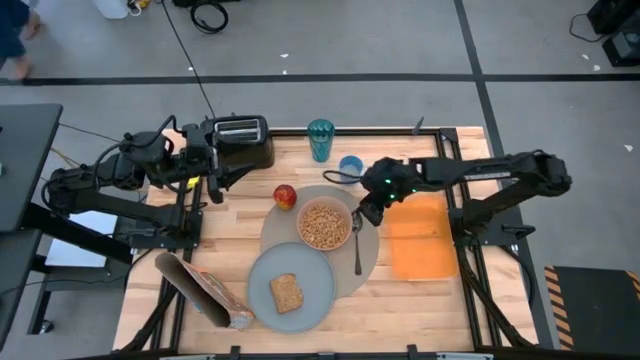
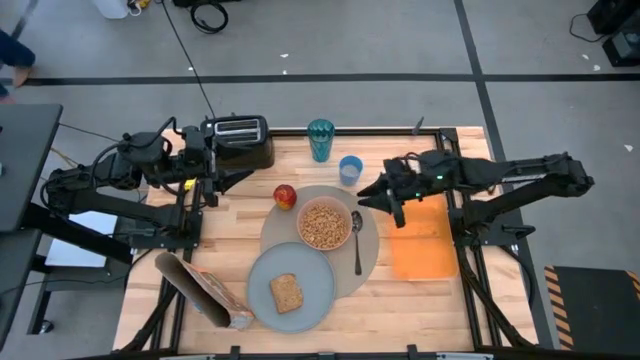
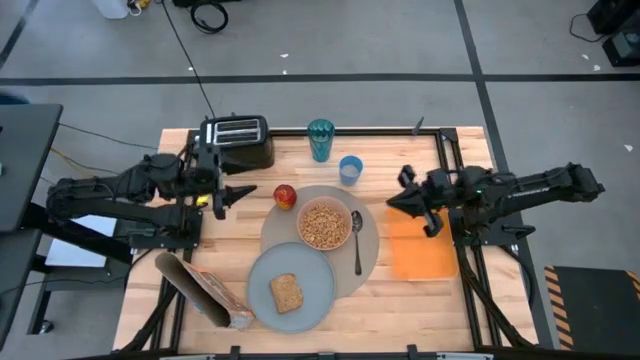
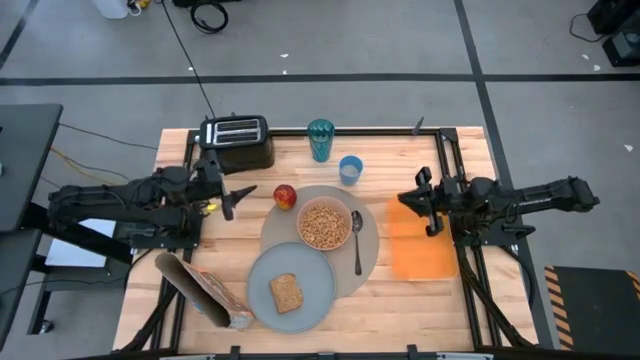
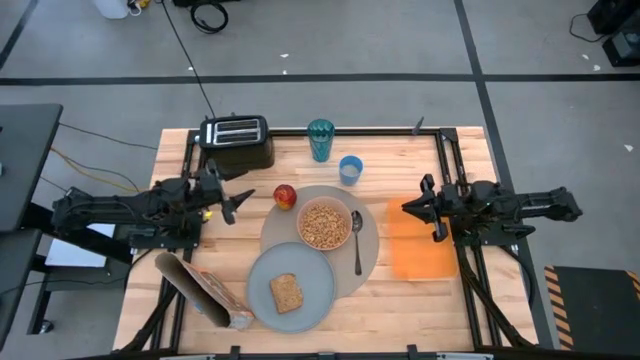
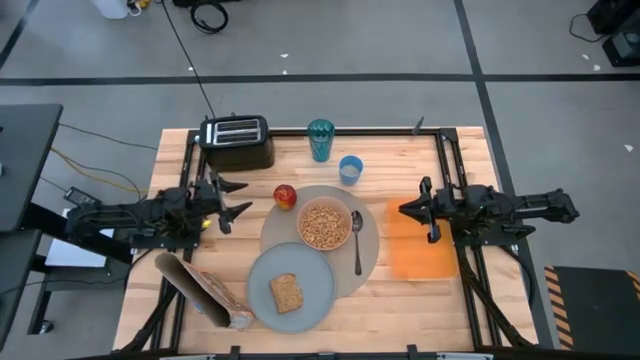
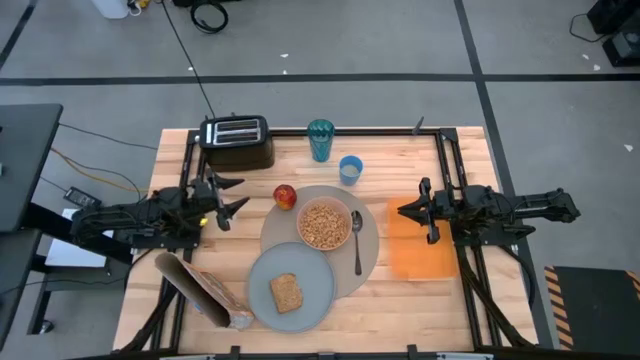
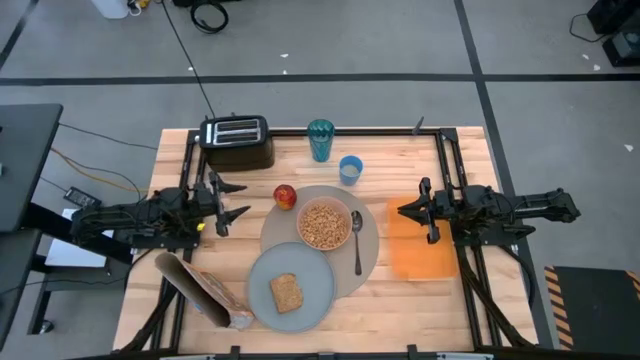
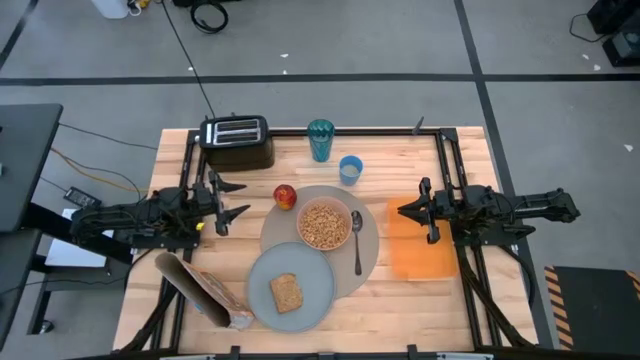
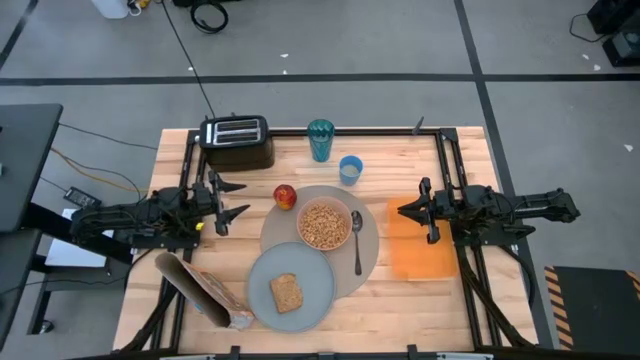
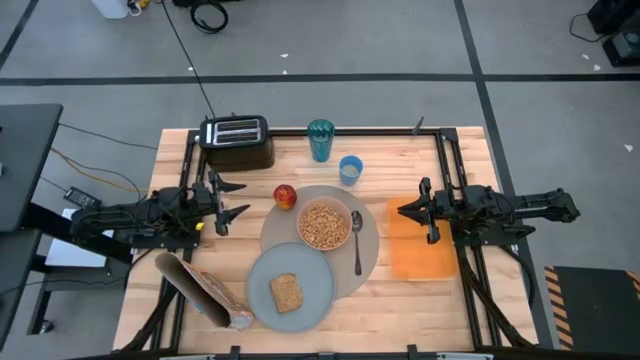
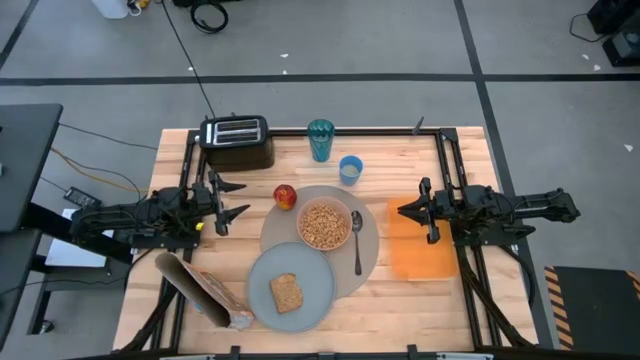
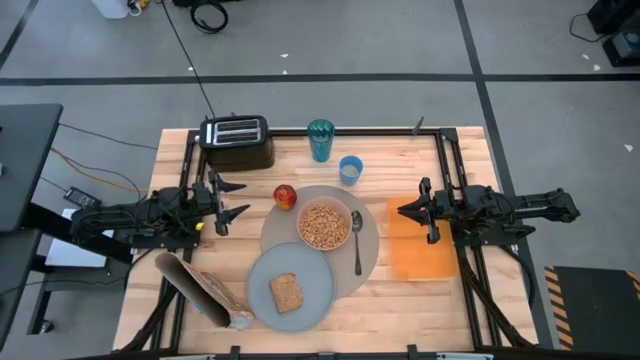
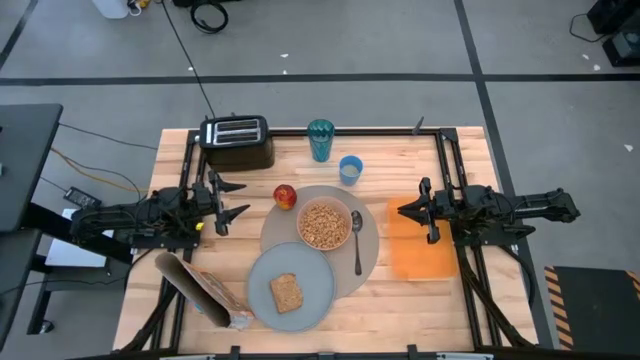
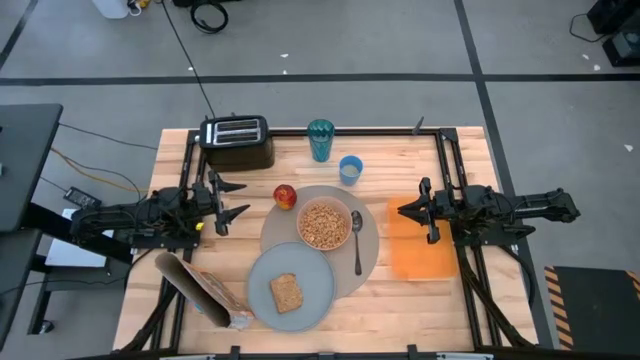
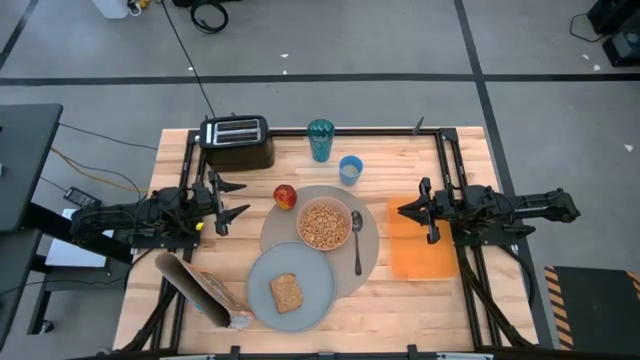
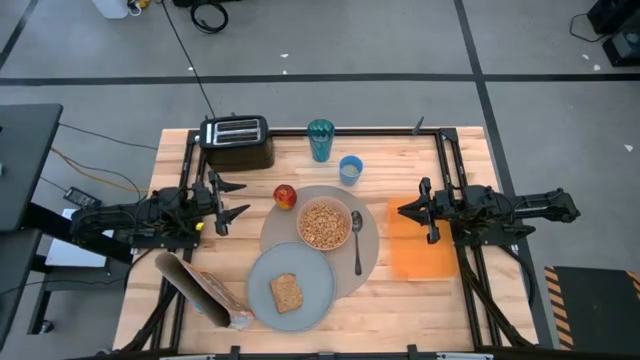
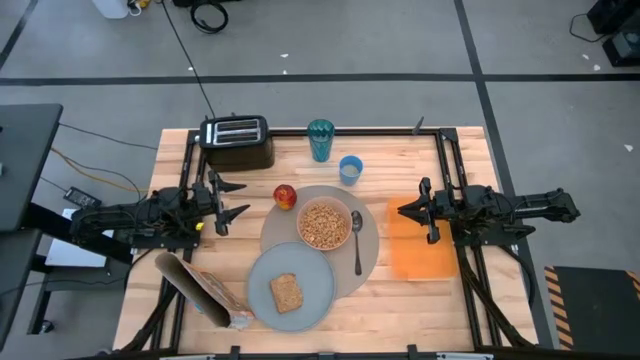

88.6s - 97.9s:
Task: Arrange a breakfast setting
Return to Home Position

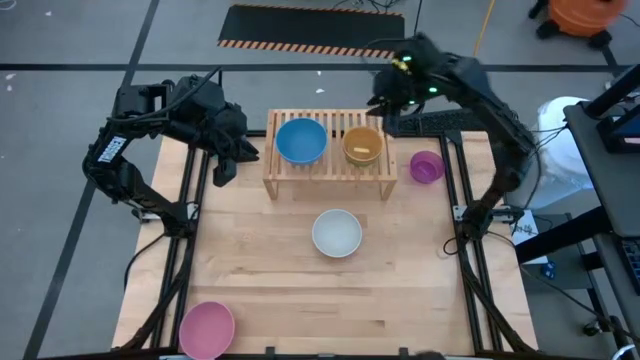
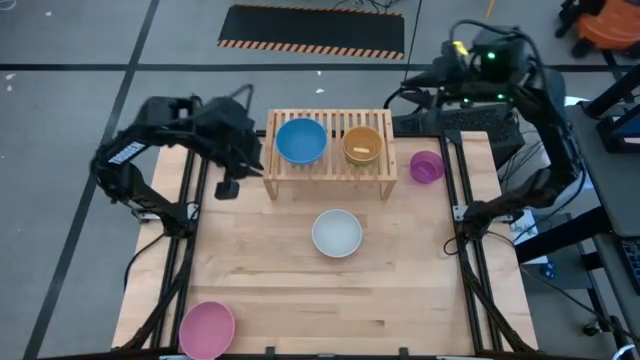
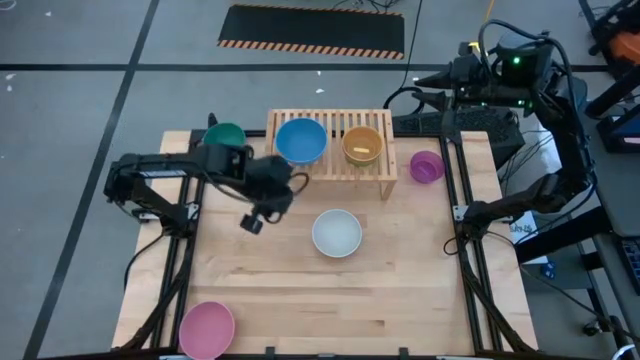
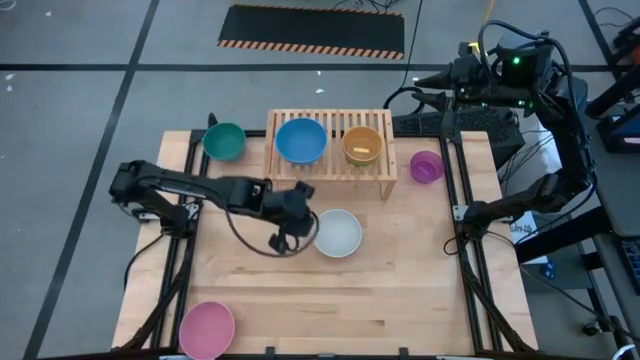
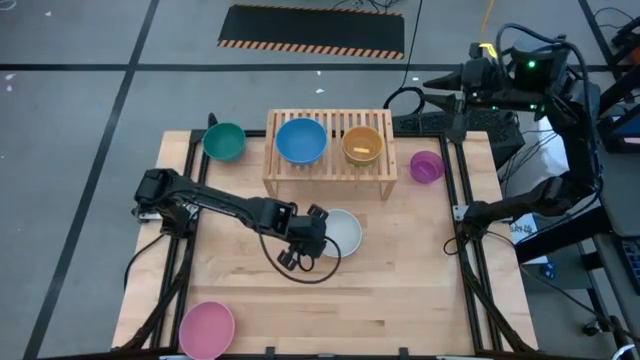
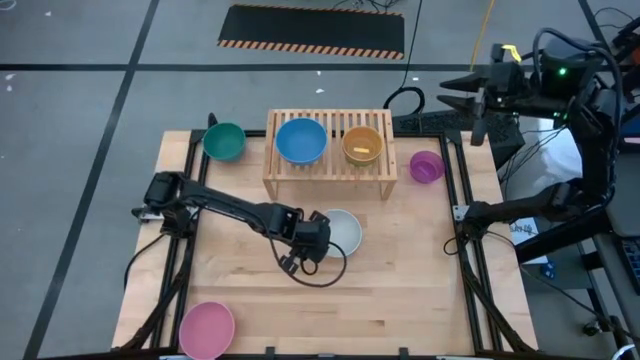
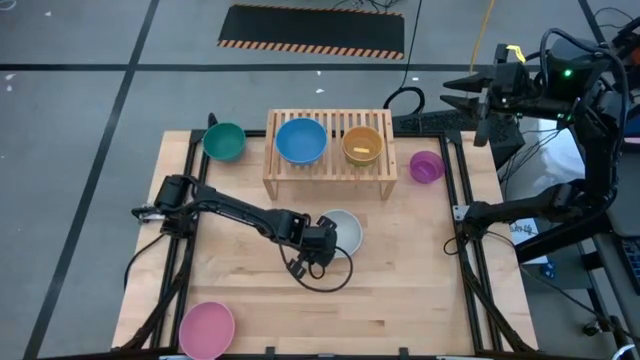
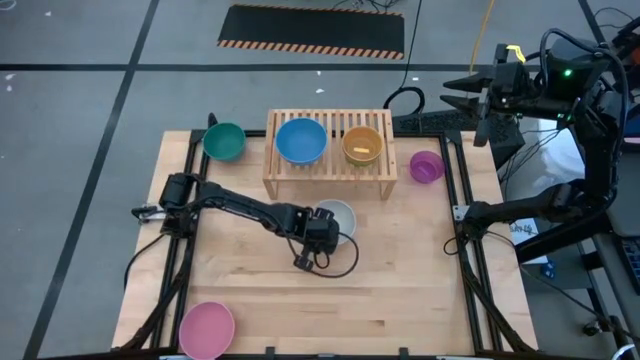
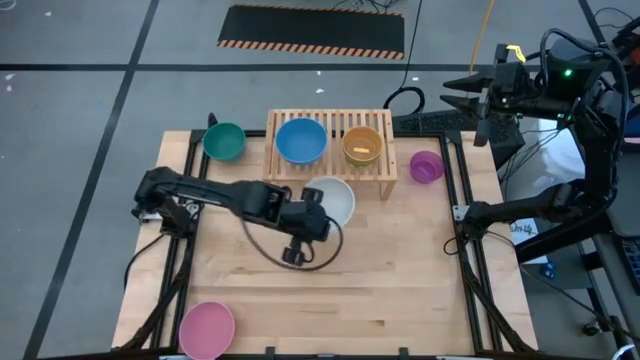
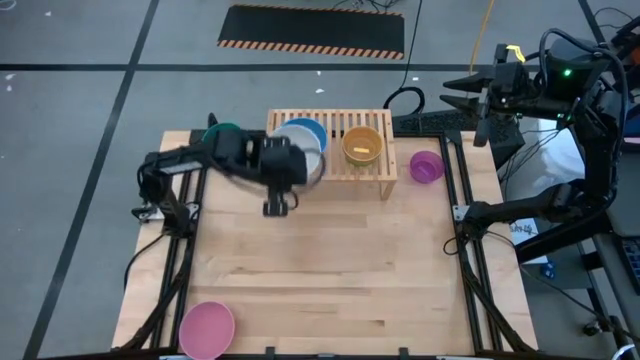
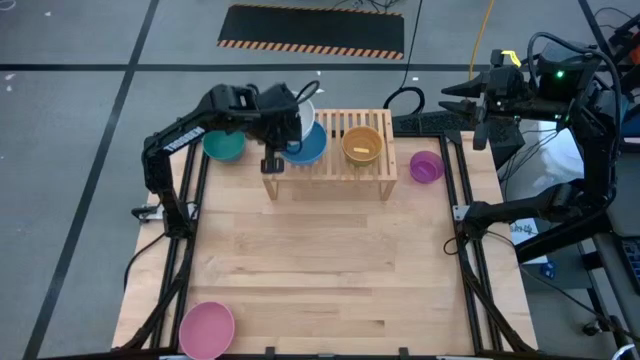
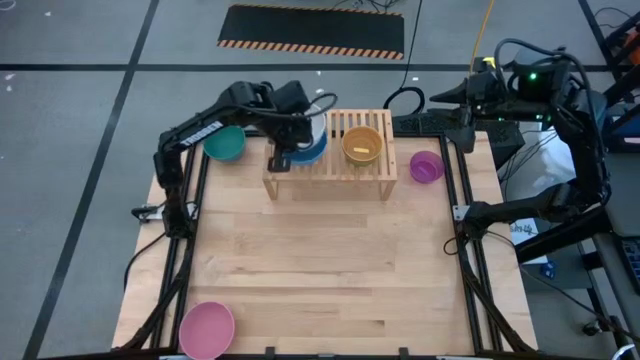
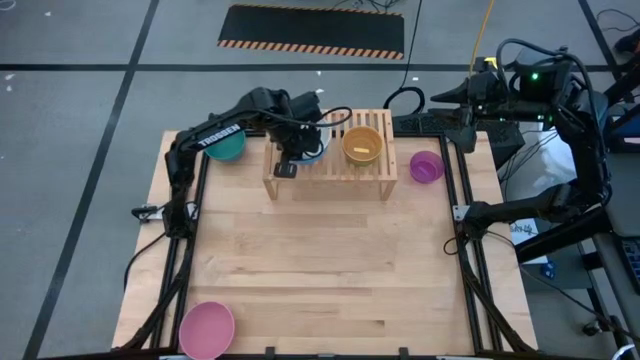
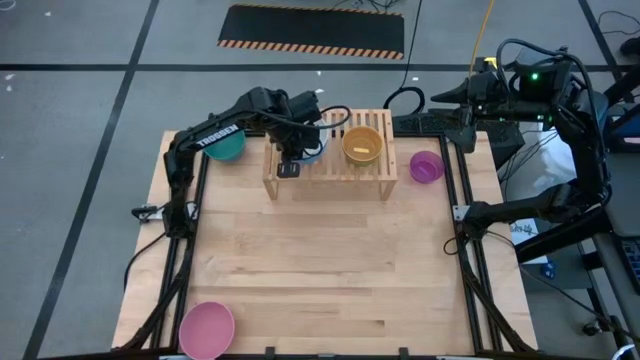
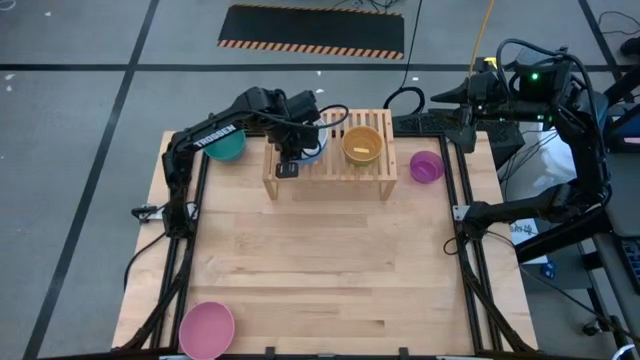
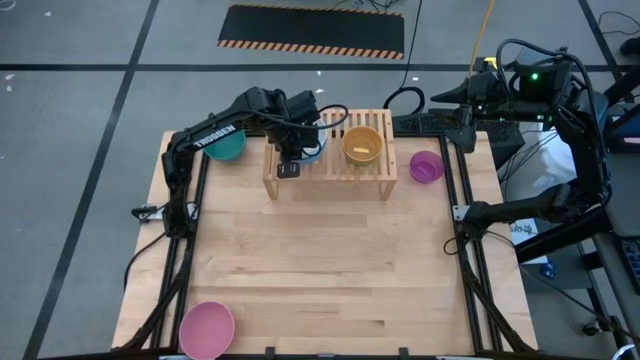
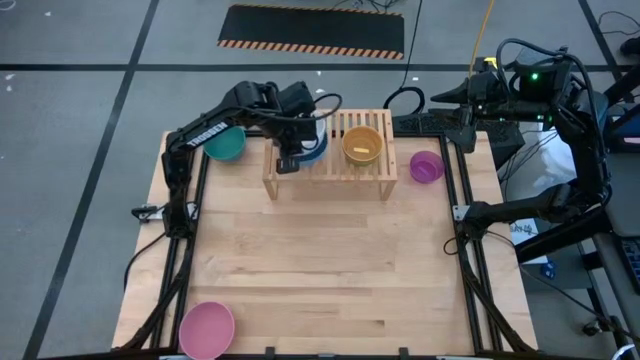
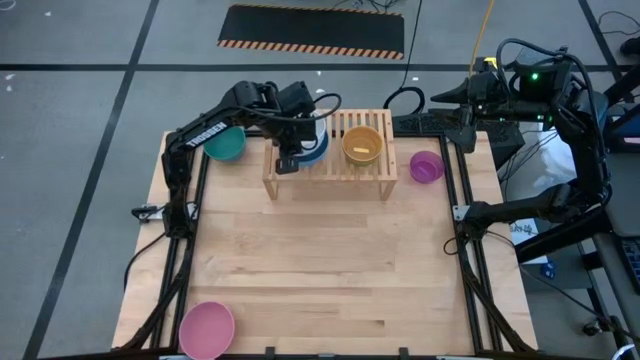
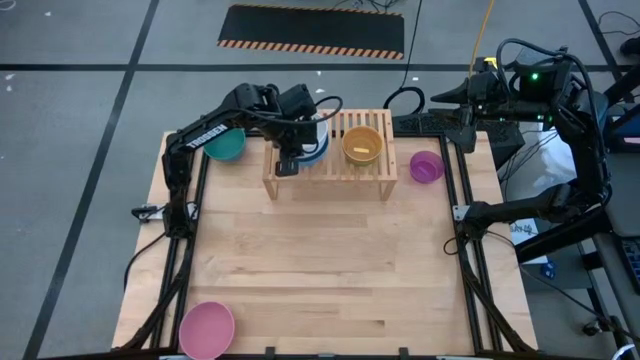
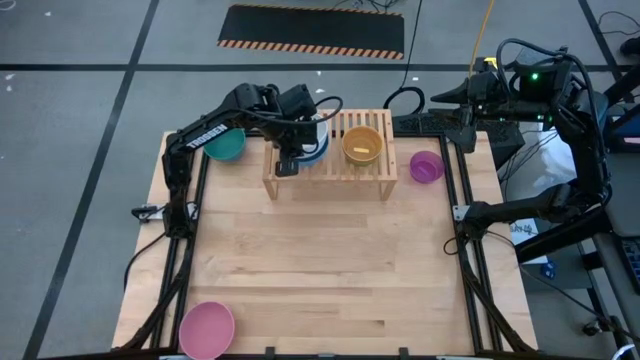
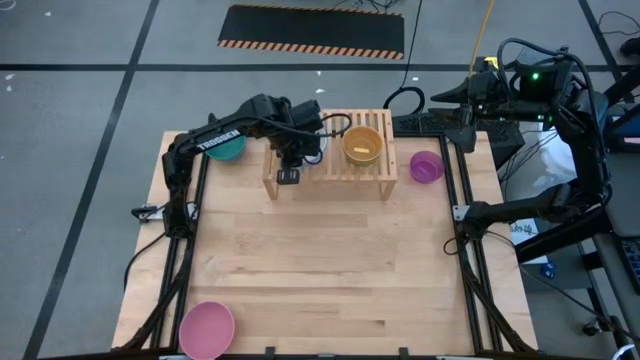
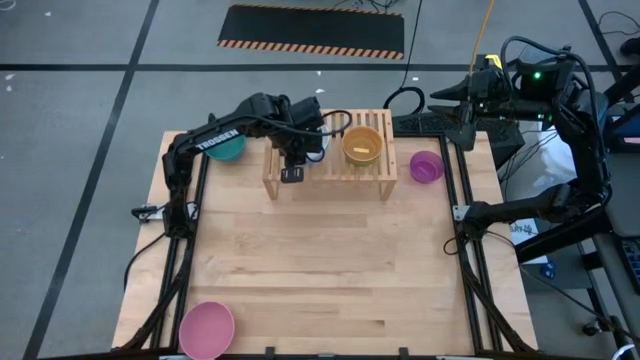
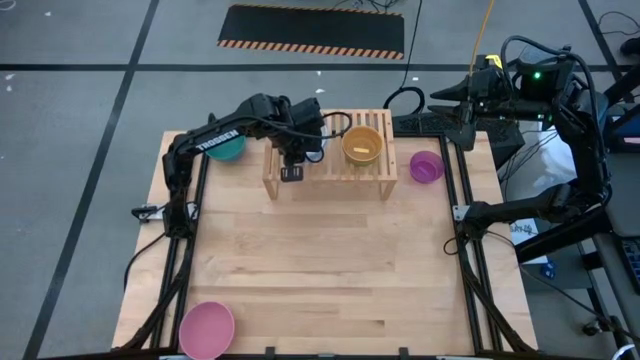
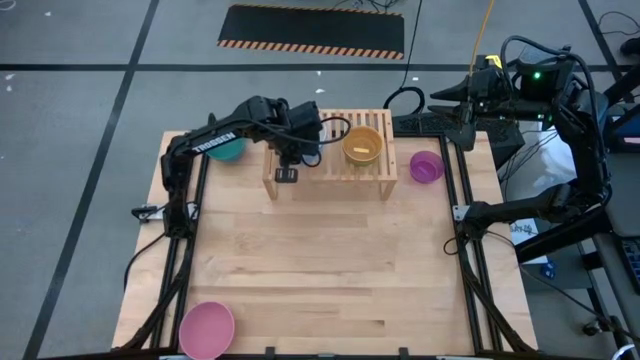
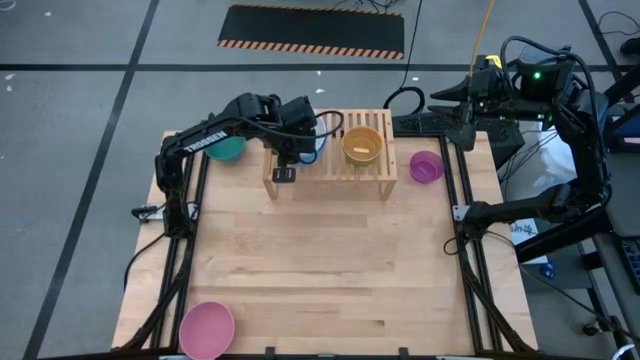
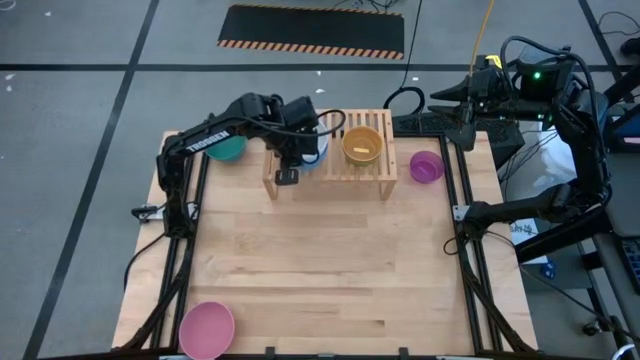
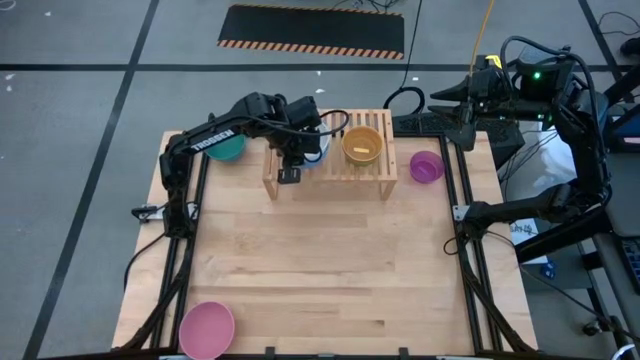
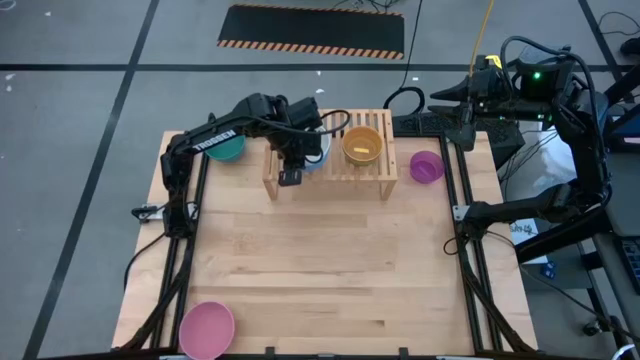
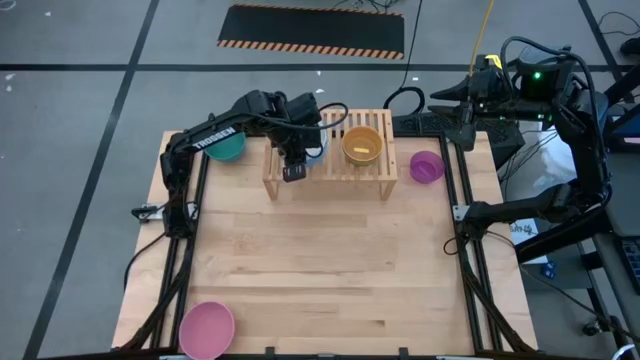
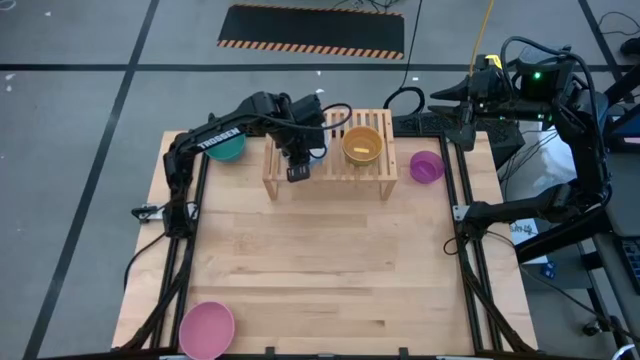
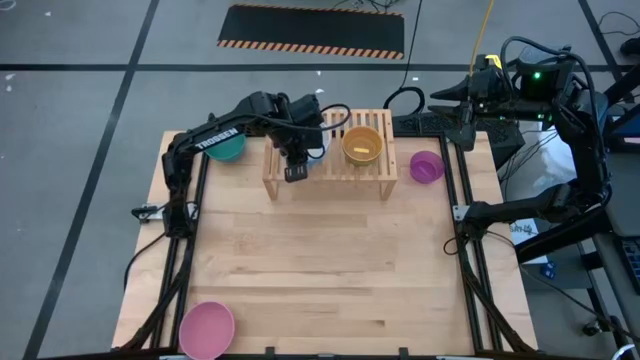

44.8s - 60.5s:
Task: Place and stack bowls onto a shelf
Stack the white bowl on top of the blue bowl on the shelf
